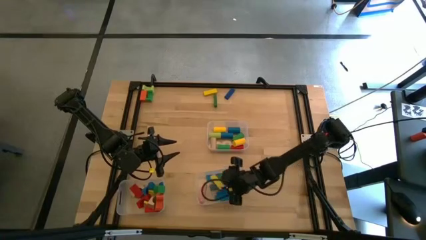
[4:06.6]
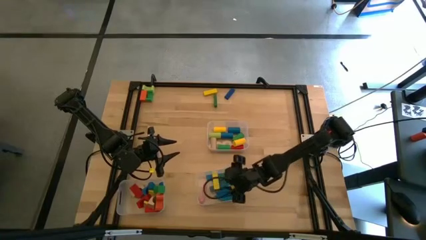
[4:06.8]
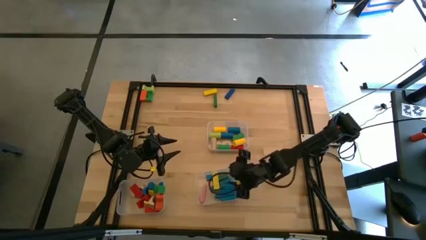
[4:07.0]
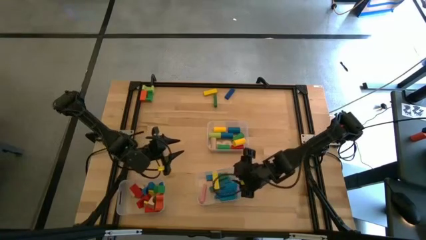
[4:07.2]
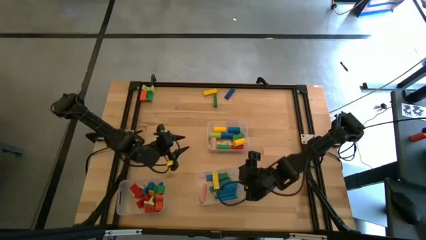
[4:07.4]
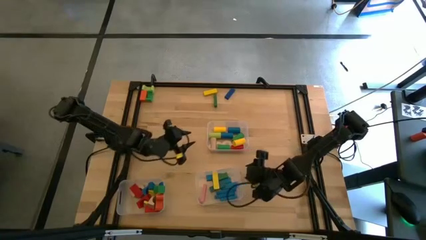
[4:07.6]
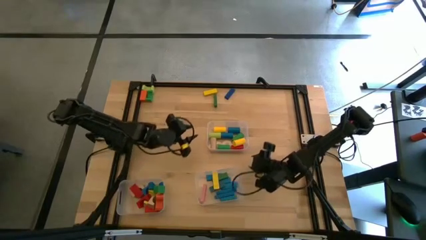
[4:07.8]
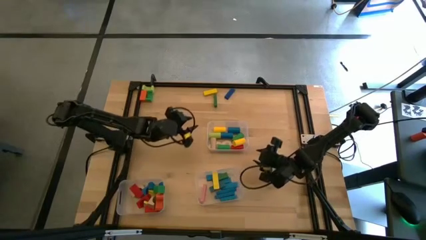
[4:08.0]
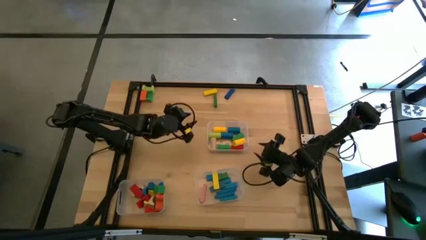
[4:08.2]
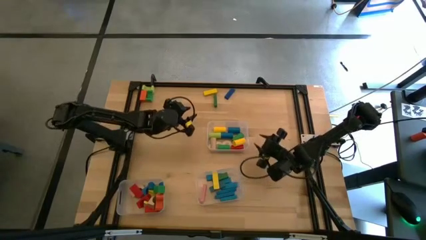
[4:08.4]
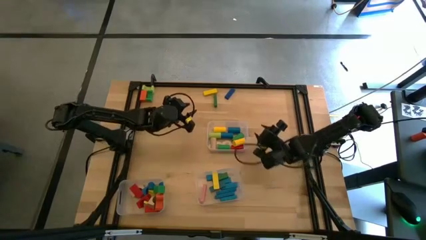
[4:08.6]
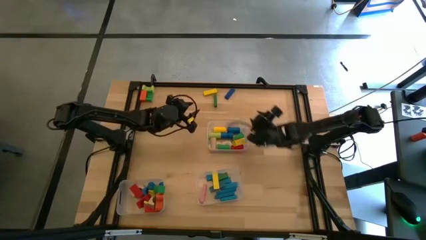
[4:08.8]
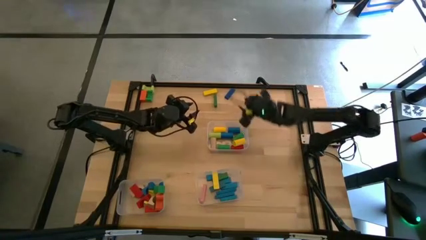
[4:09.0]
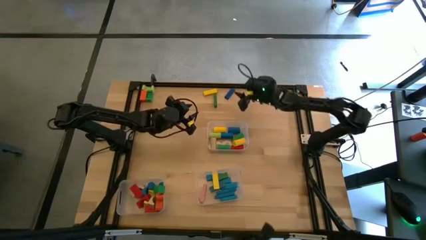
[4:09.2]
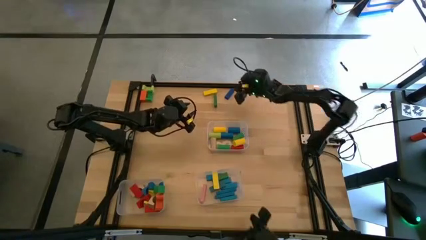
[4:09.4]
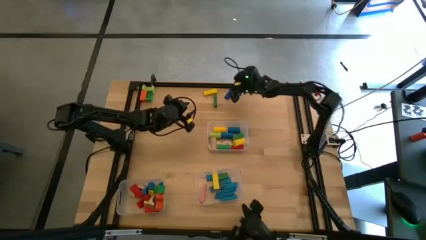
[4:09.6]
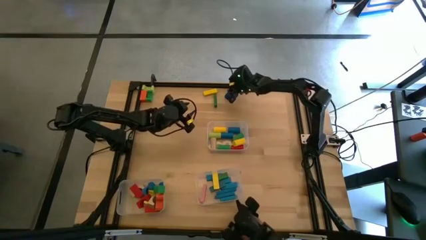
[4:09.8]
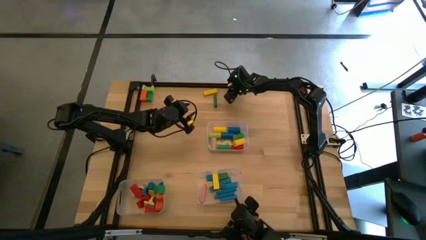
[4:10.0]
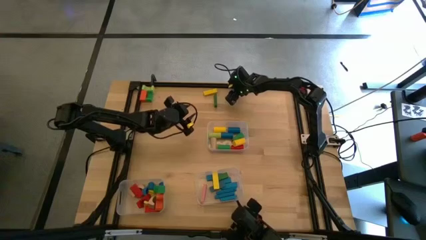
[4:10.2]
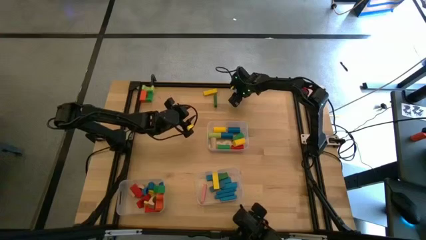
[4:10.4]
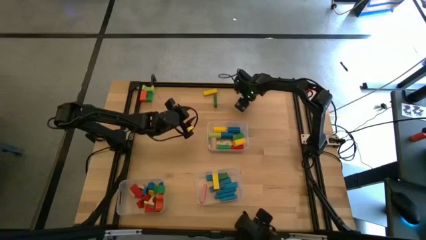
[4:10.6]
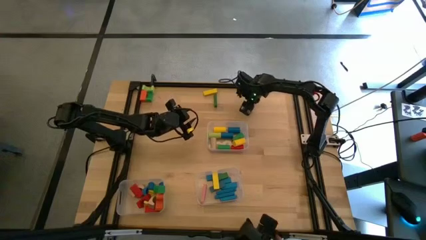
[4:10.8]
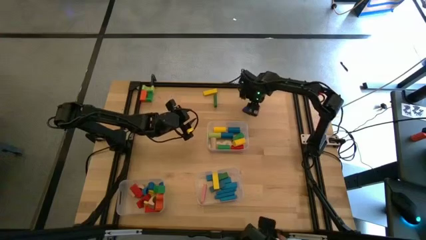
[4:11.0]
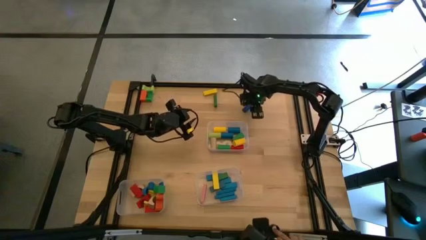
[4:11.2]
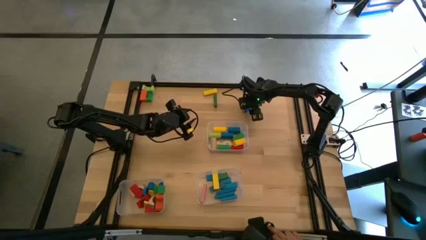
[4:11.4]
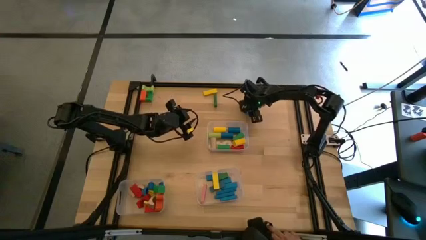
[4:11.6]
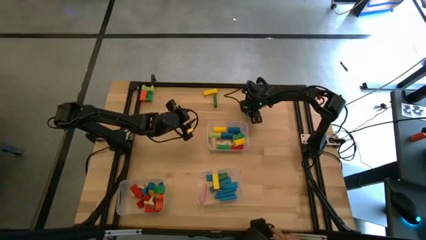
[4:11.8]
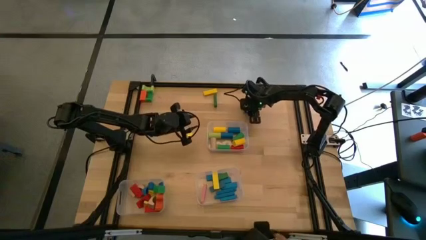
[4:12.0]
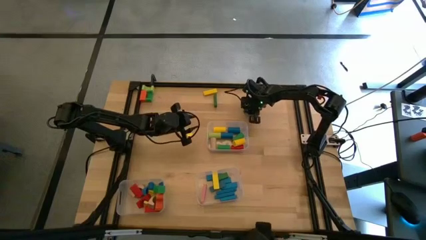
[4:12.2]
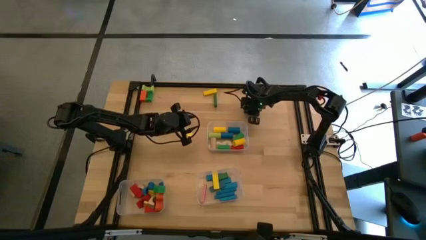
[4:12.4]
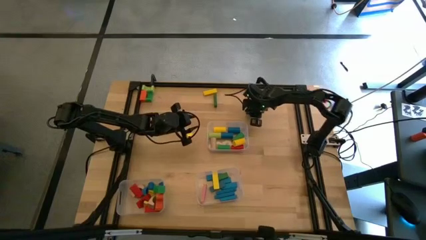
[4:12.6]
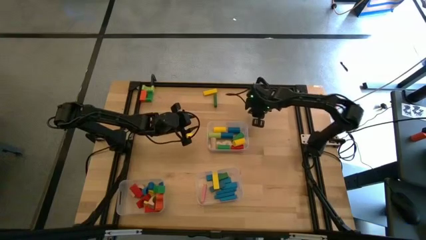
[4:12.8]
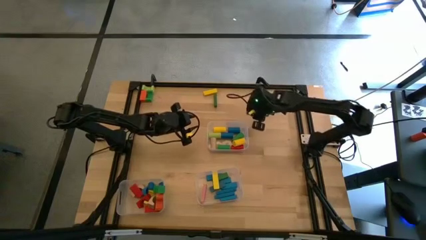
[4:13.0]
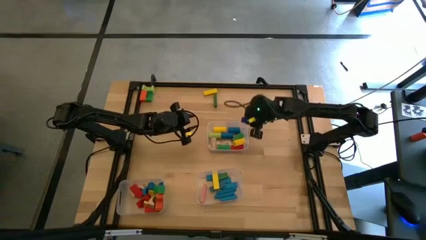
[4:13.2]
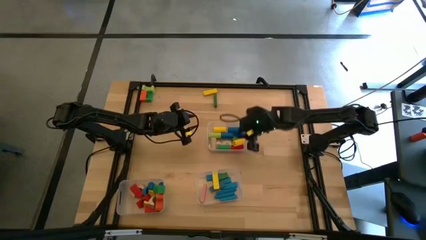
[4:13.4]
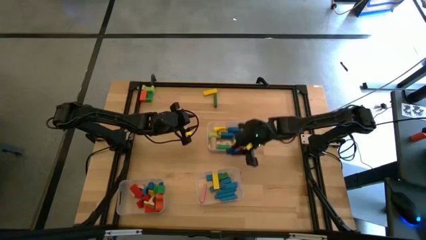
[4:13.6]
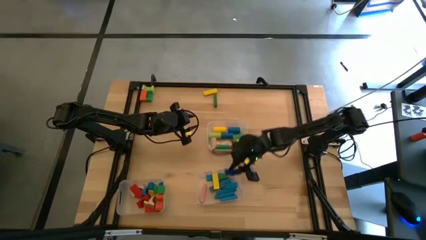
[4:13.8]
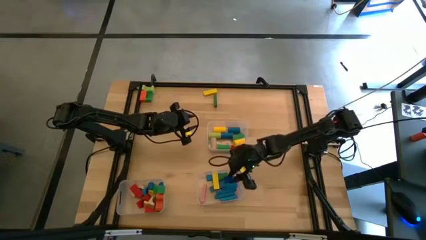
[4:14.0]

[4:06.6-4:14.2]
Task: Sort blocks by size
Put the blue rectangular block into the bottom right transparent bin

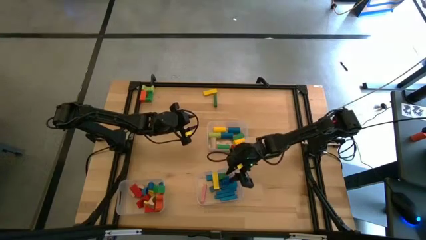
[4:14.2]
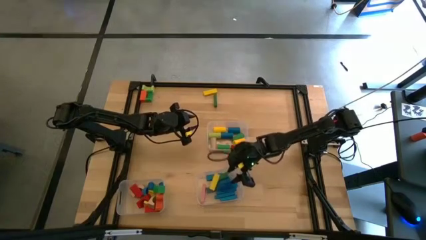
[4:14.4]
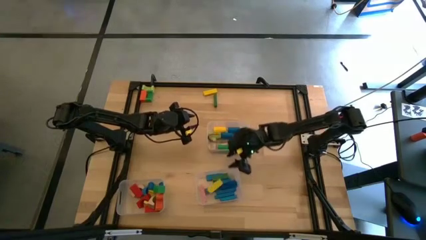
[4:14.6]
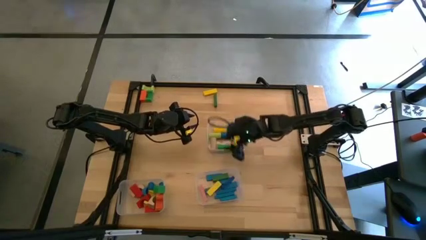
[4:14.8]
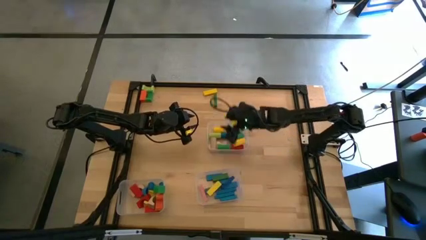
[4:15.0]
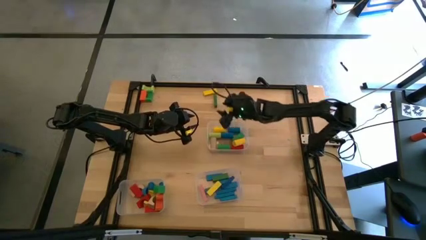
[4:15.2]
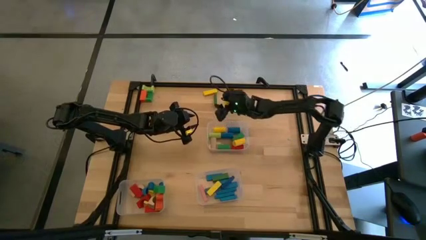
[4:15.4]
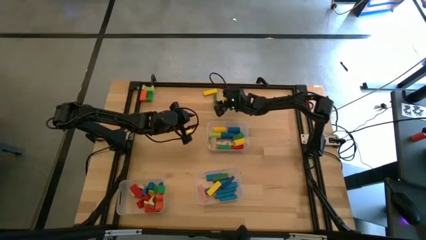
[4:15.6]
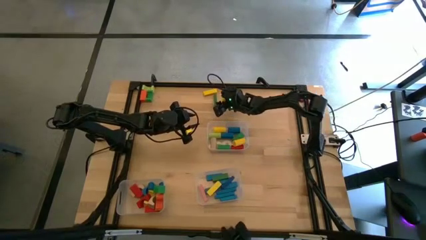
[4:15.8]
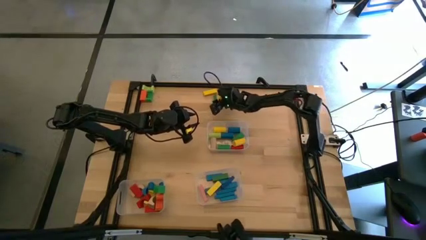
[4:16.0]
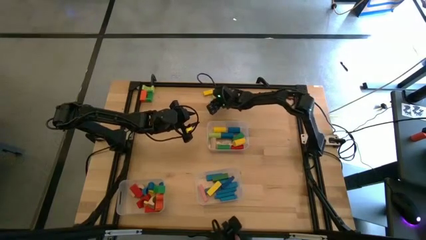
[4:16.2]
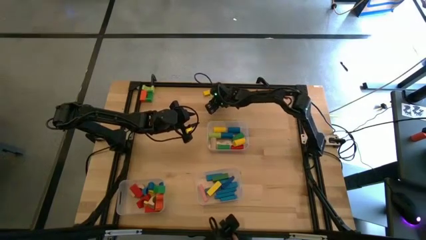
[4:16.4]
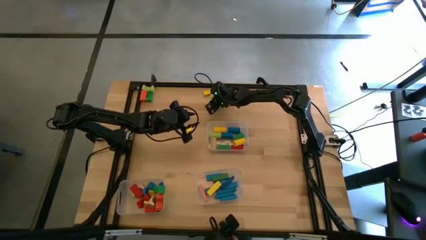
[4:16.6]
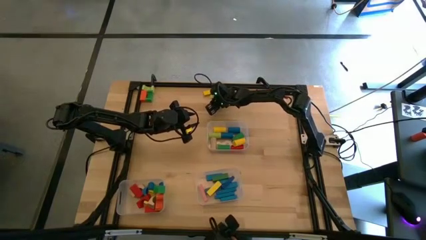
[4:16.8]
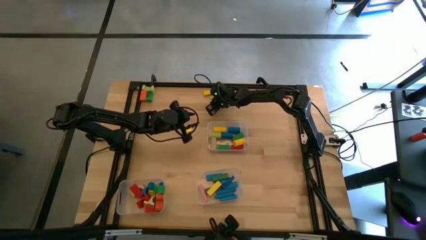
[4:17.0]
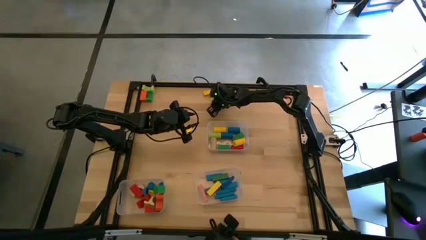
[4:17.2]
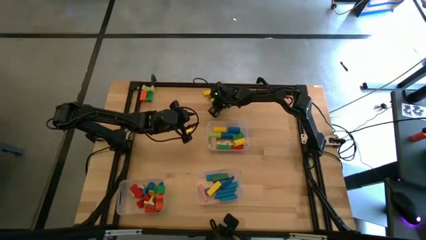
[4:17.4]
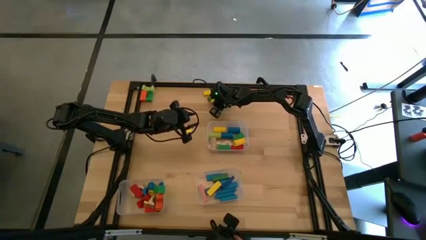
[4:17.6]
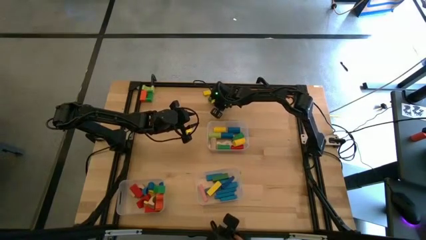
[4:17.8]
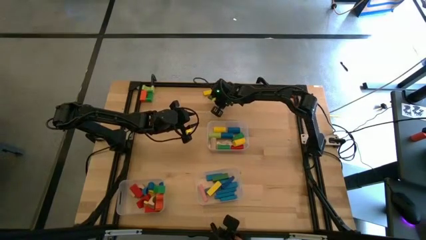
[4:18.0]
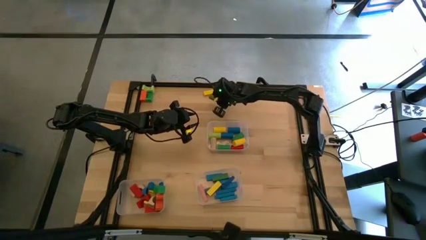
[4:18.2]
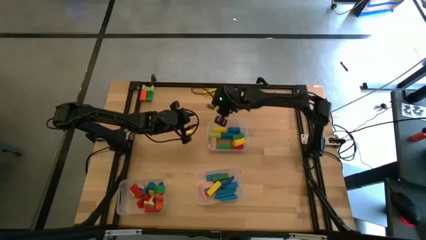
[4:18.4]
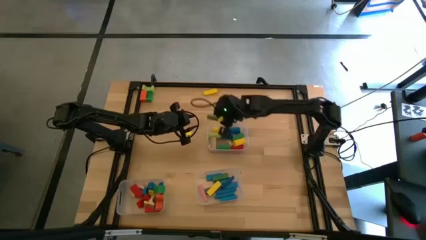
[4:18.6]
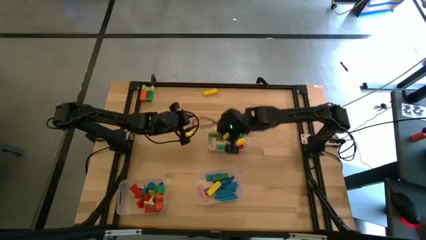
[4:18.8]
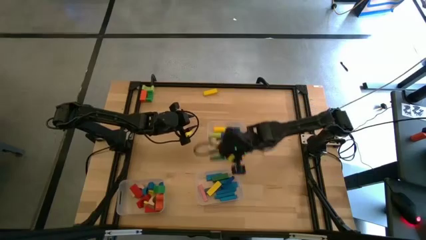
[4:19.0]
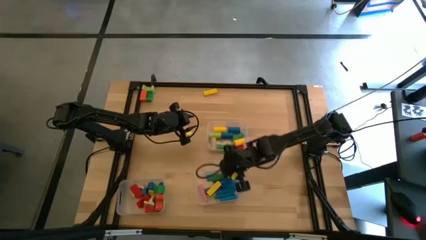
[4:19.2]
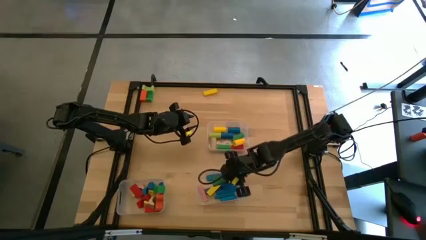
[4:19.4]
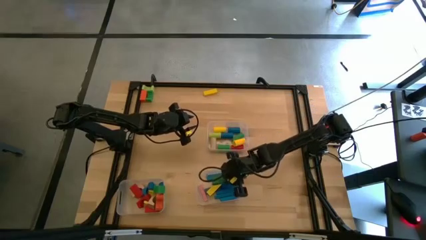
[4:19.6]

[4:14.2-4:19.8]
Put the green rectangular block into the bottom right transparent bin

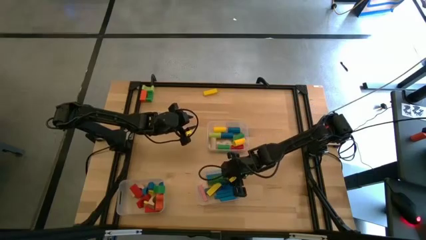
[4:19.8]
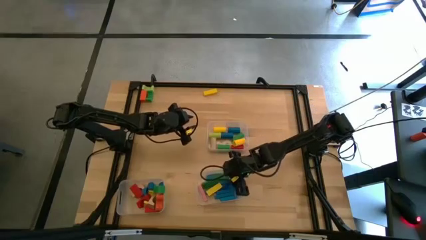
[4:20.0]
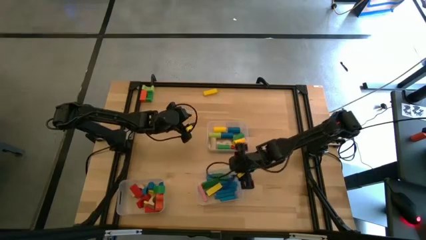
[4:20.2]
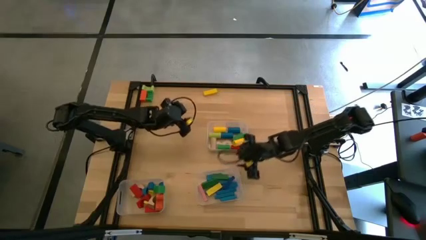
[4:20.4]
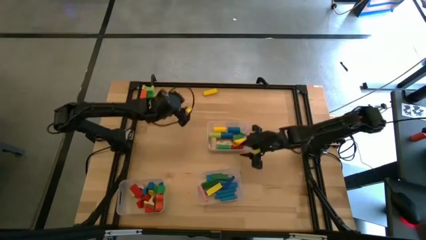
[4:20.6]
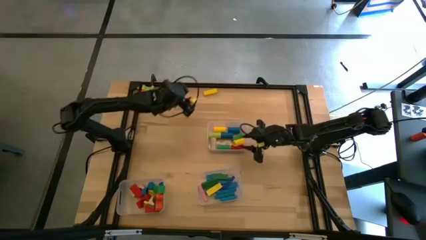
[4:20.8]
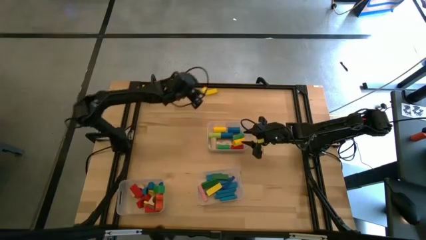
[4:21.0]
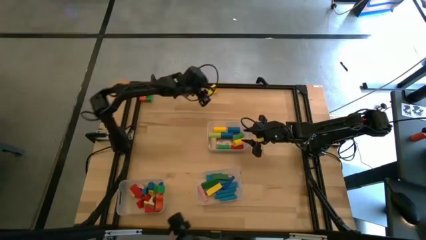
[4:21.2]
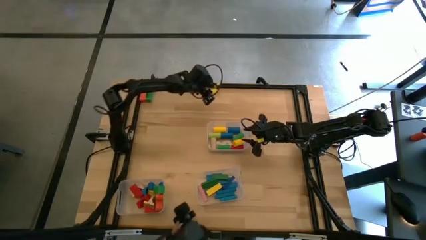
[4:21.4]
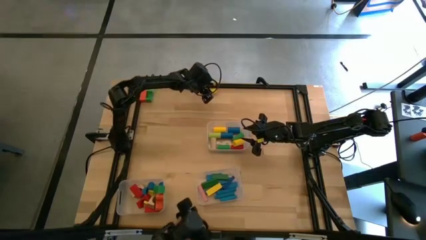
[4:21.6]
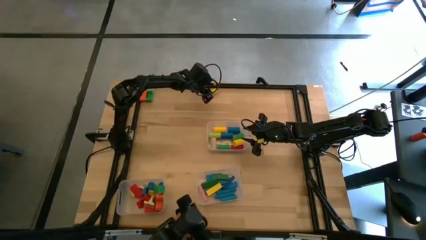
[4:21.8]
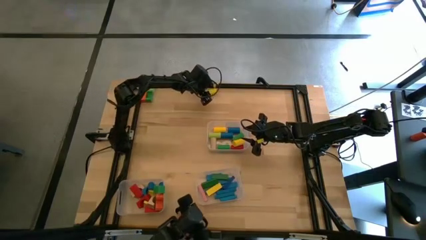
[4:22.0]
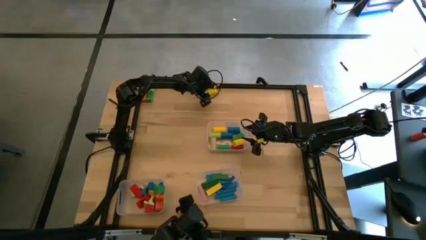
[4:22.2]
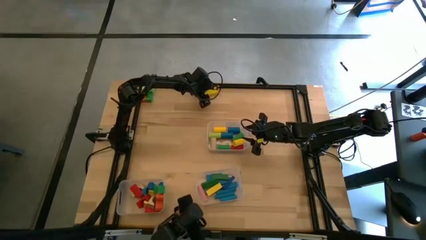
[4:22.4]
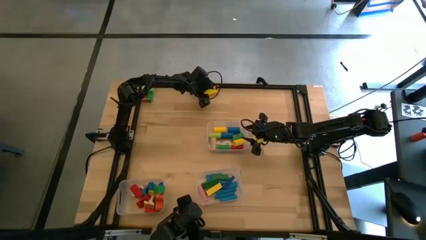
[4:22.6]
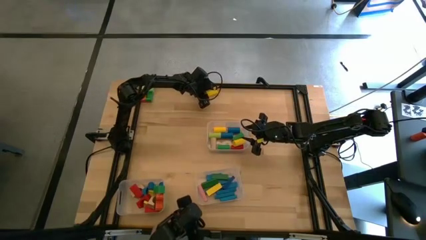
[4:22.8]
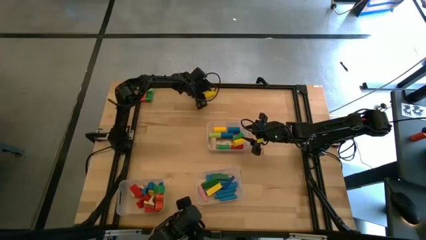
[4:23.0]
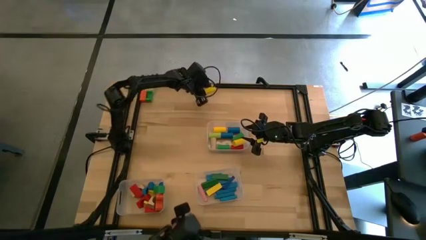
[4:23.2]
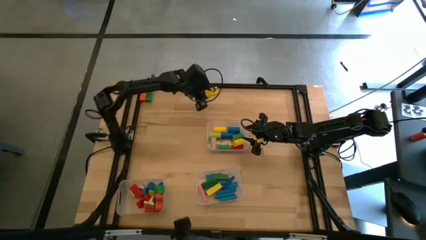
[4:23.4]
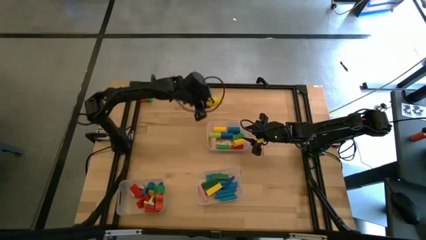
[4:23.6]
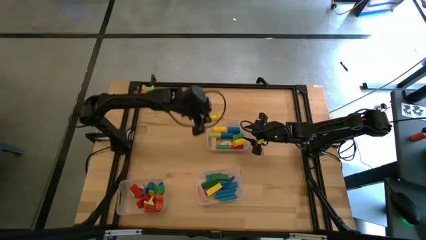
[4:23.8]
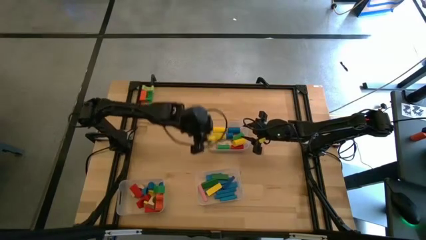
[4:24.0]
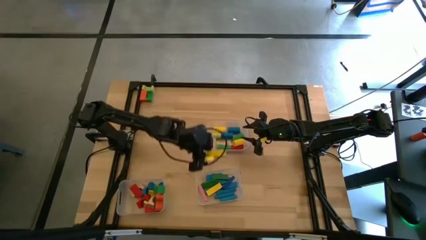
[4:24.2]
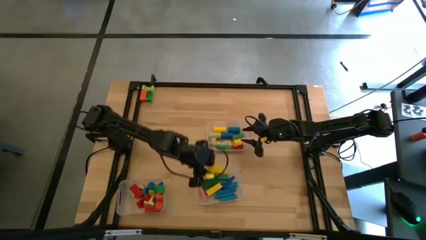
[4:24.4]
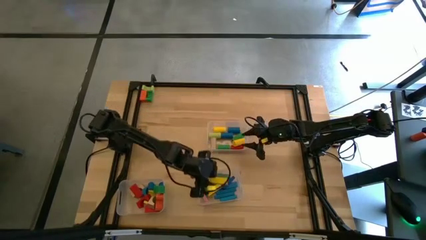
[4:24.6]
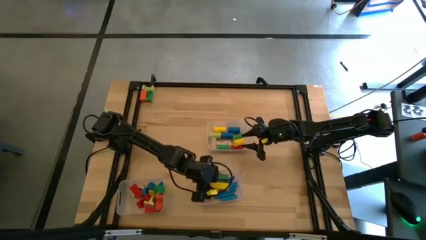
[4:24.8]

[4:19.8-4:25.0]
Put the yellow rectangular block into the bottom right transparent bin
